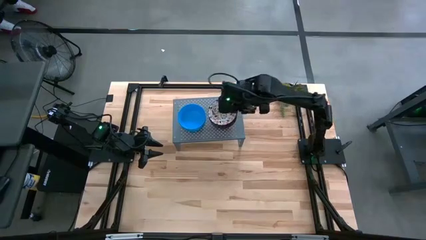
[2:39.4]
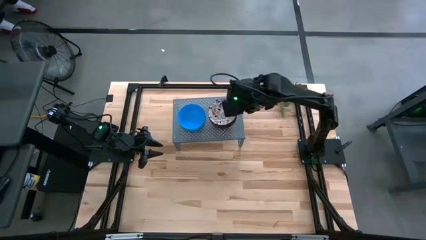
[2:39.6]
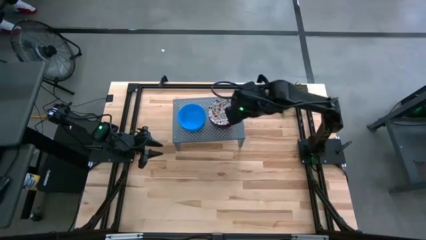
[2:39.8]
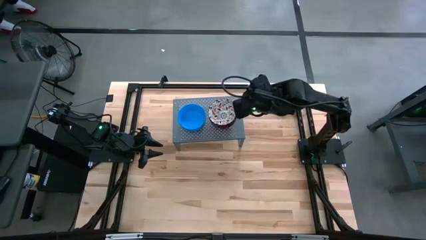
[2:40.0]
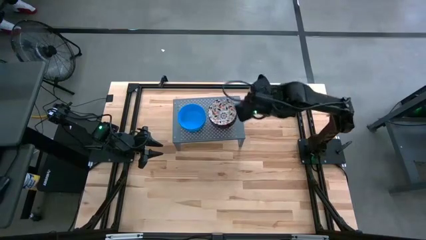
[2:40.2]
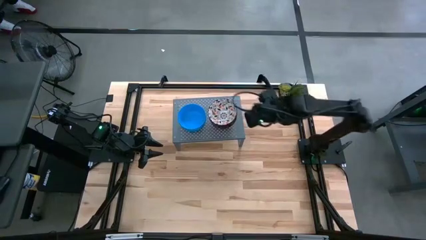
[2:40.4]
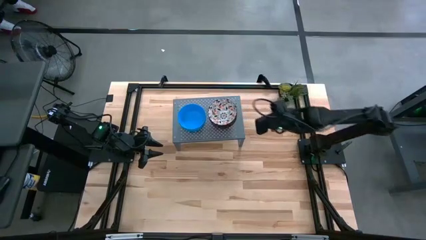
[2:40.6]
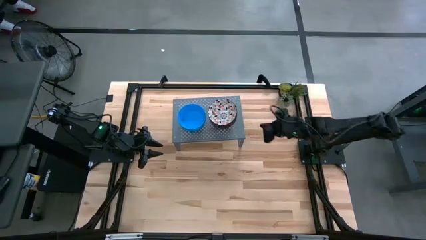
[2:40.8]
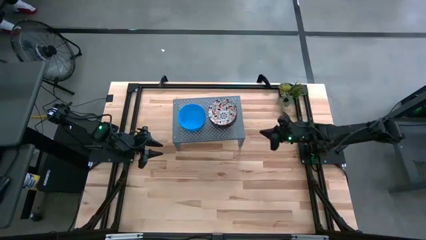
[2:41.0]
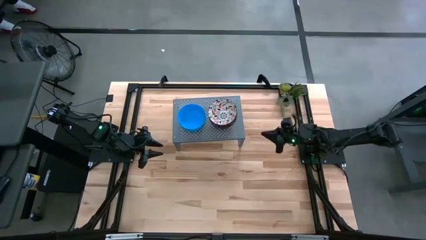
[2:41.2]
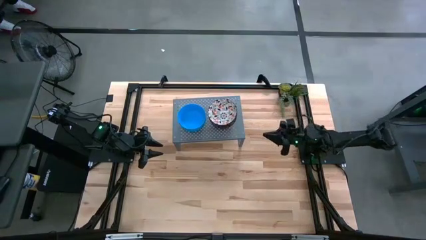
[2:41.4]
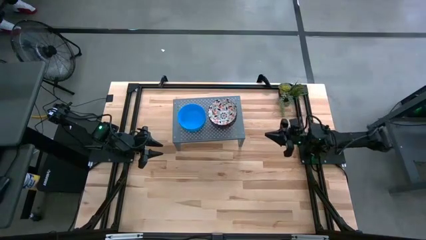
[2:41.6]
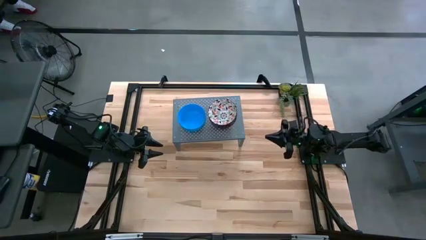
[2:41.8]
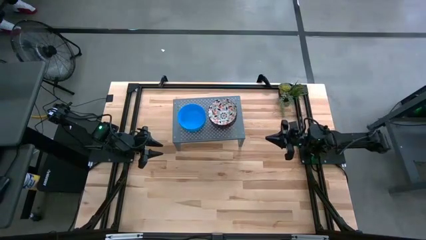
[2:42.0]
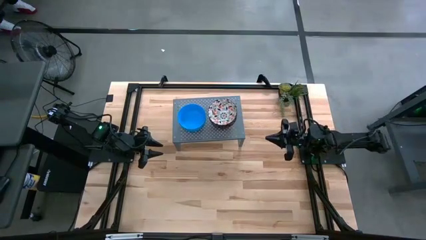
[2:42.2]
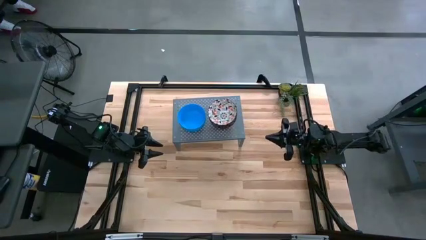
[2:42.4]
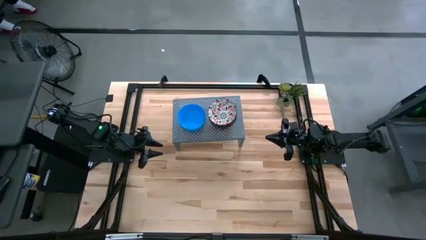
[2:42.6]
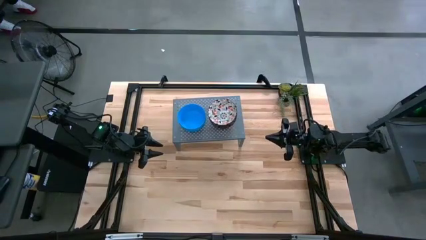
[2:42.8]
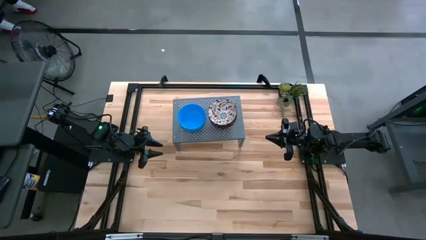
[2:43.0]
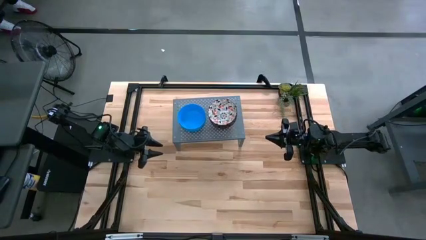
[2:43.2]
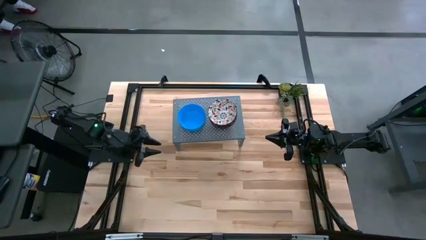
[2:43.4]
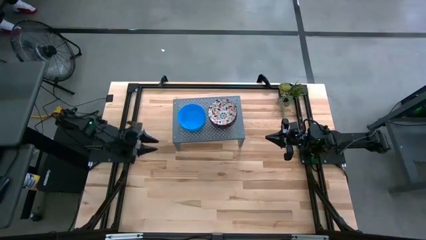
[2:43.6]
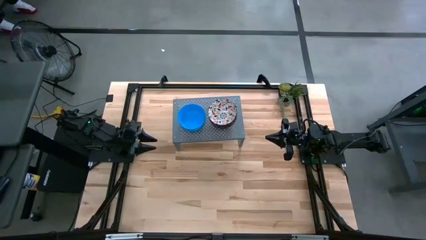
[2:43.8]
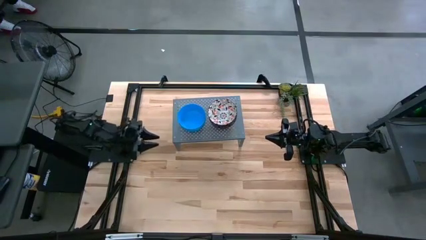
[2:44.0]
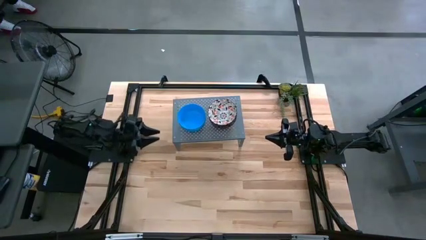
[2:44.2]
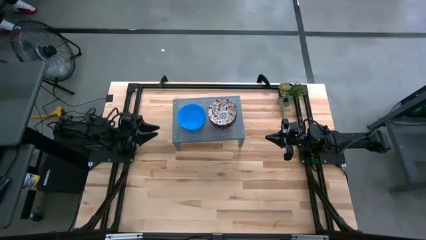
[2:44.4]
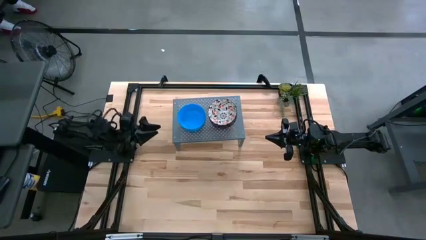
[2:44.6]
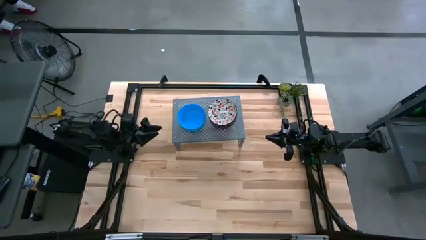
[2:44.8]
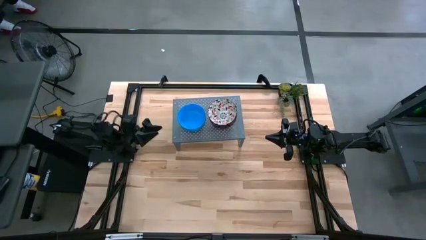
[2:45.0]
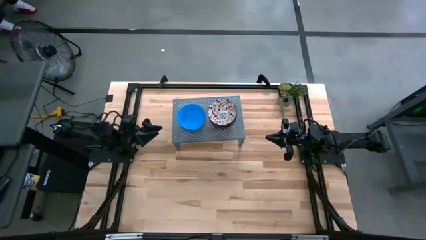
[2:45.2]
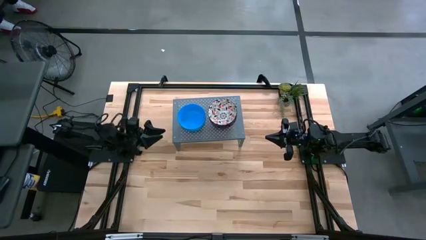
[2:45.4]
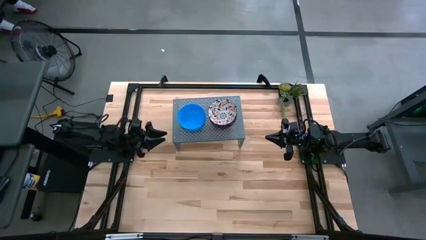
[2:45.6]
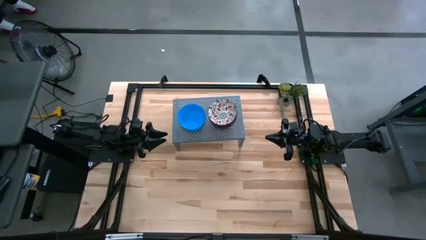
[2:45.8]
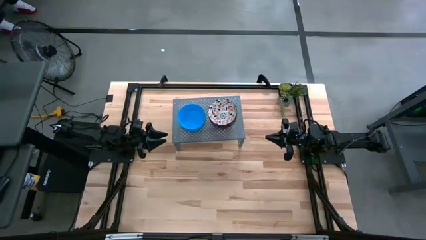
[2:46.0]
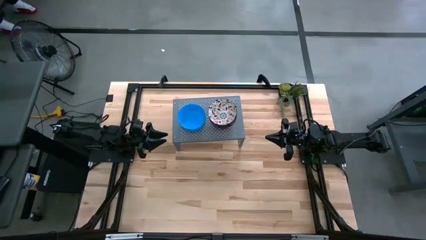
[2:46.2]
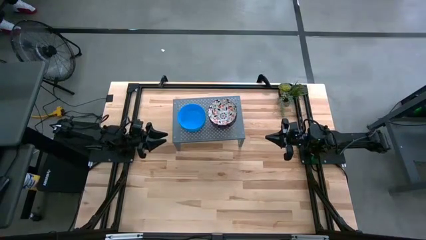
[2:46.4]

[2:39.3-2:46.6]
Task: Pick & Place Mini bowls
Return to Home Position

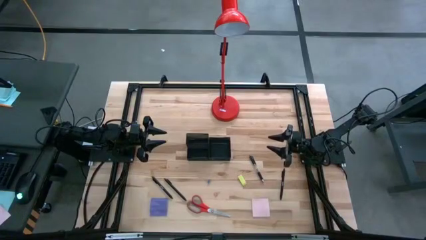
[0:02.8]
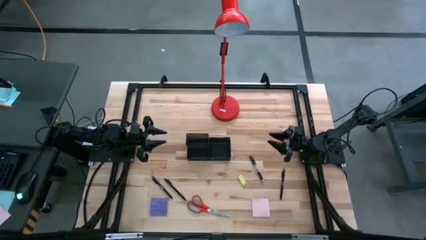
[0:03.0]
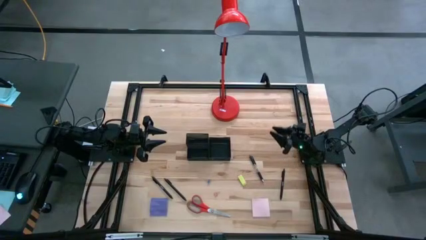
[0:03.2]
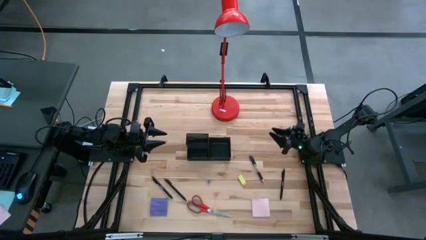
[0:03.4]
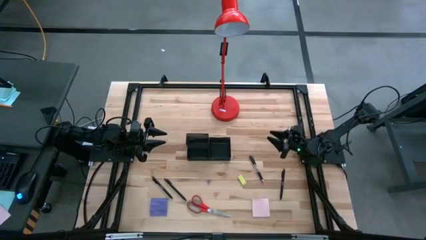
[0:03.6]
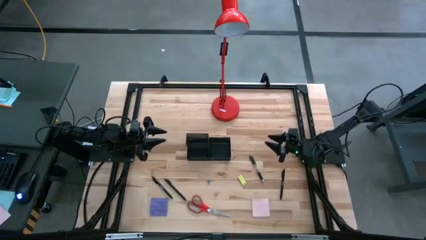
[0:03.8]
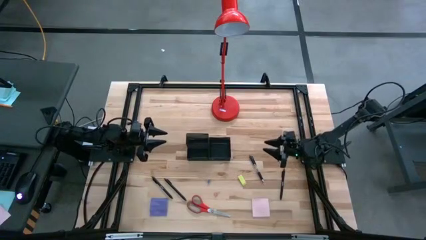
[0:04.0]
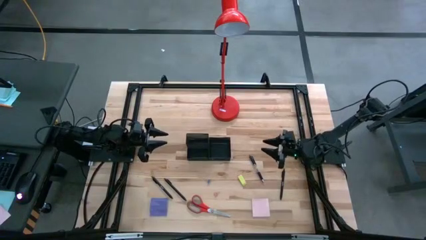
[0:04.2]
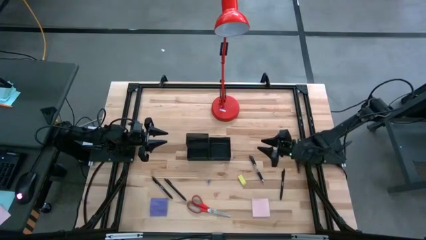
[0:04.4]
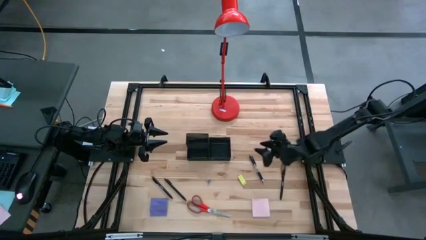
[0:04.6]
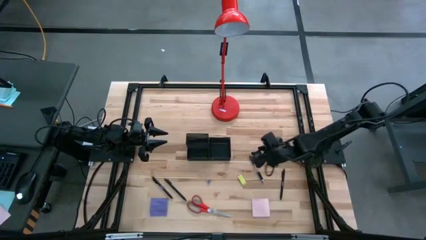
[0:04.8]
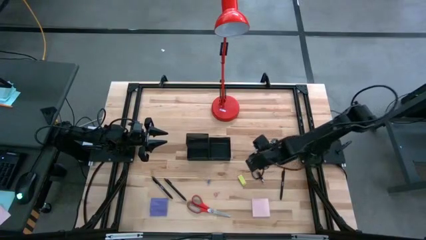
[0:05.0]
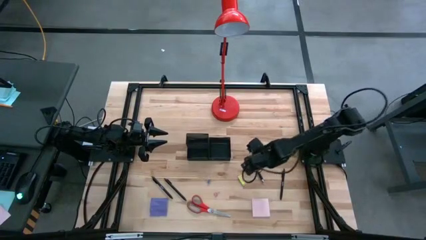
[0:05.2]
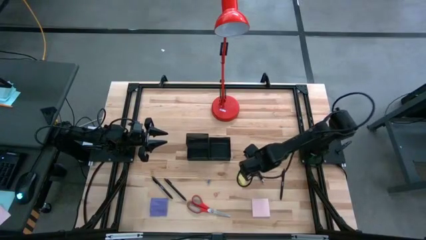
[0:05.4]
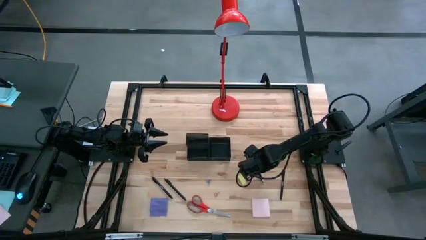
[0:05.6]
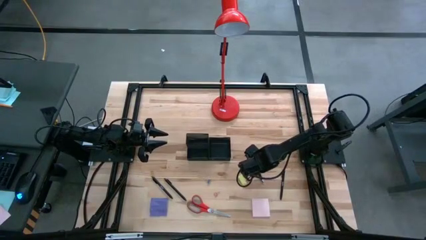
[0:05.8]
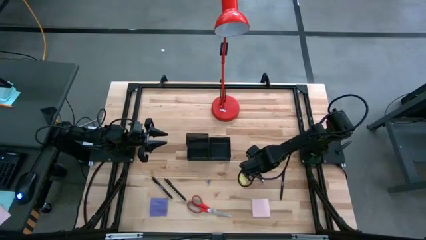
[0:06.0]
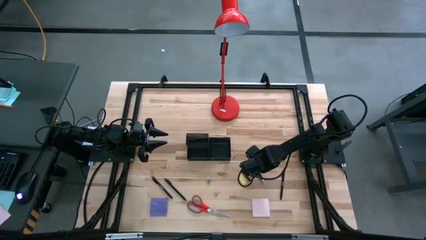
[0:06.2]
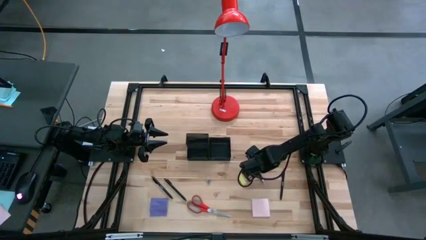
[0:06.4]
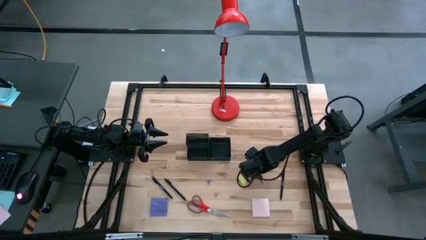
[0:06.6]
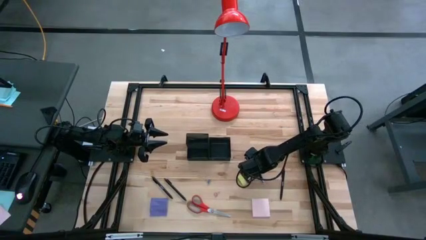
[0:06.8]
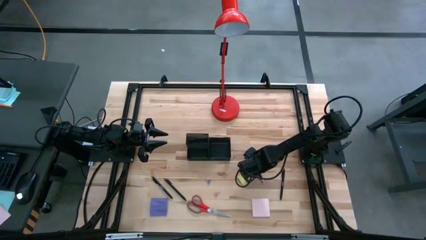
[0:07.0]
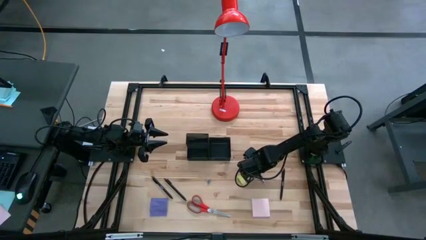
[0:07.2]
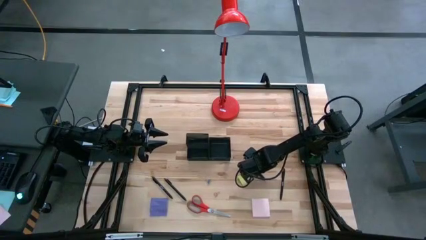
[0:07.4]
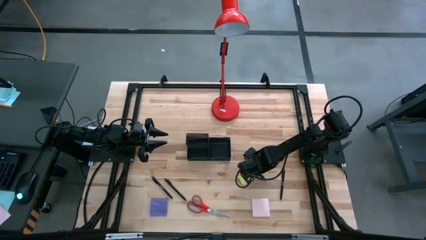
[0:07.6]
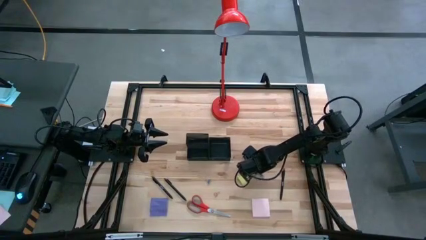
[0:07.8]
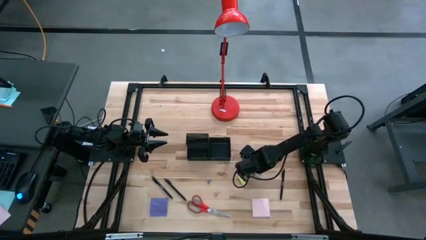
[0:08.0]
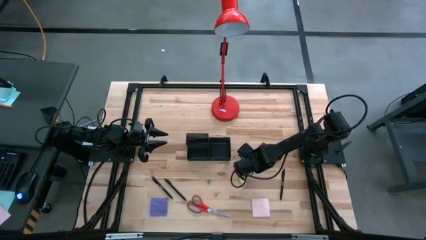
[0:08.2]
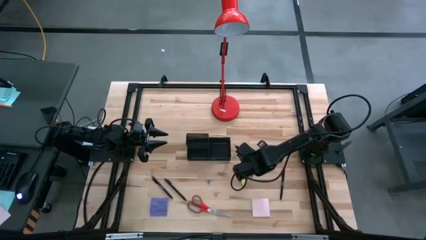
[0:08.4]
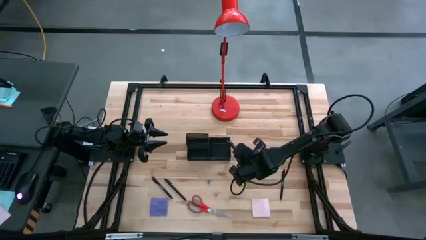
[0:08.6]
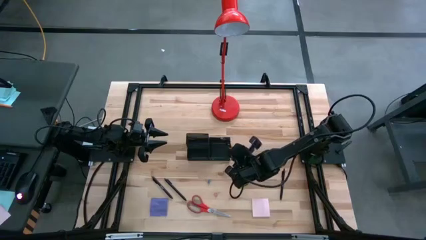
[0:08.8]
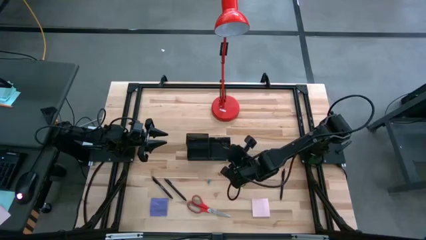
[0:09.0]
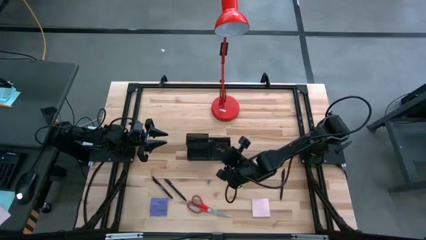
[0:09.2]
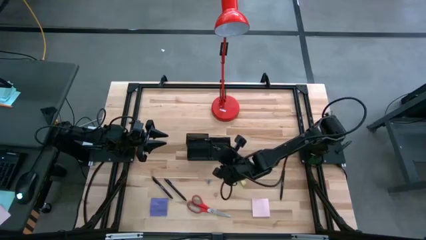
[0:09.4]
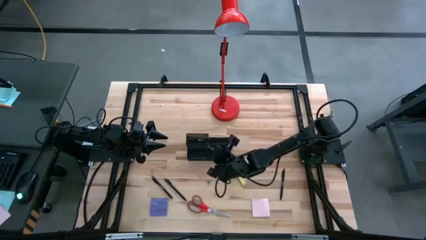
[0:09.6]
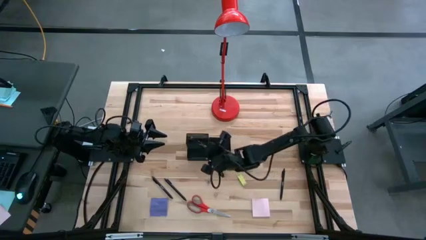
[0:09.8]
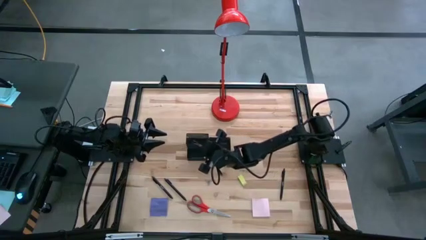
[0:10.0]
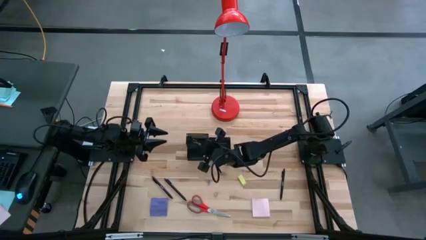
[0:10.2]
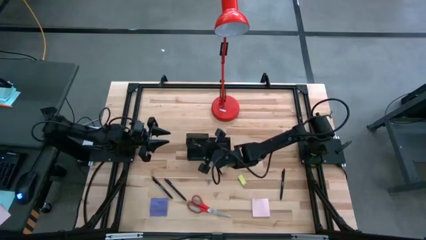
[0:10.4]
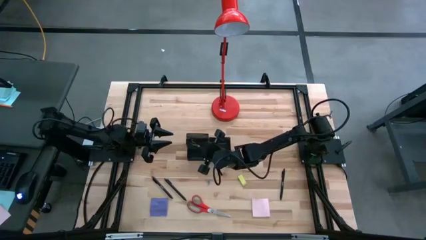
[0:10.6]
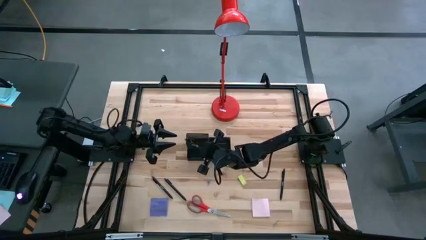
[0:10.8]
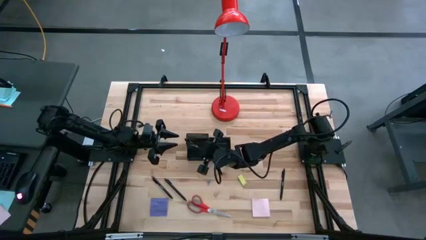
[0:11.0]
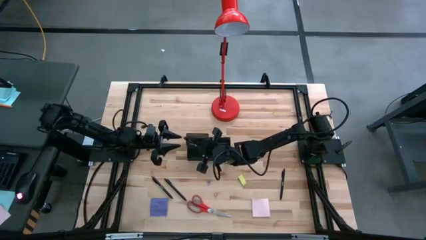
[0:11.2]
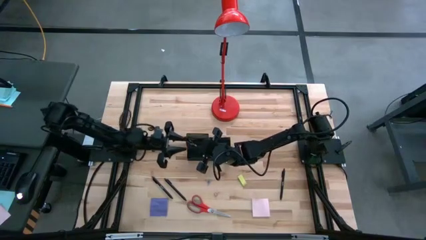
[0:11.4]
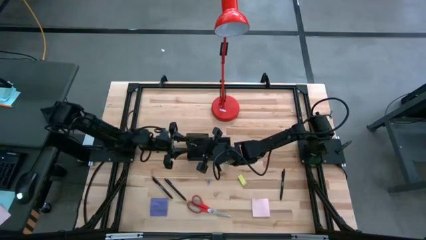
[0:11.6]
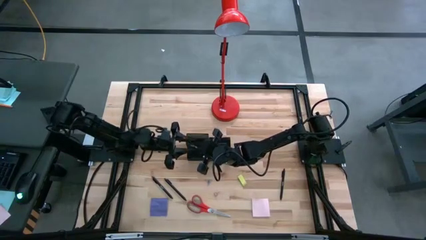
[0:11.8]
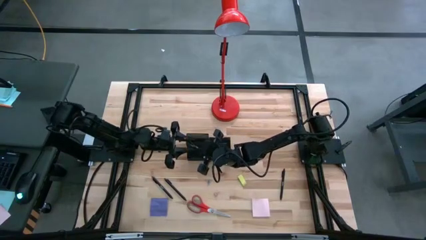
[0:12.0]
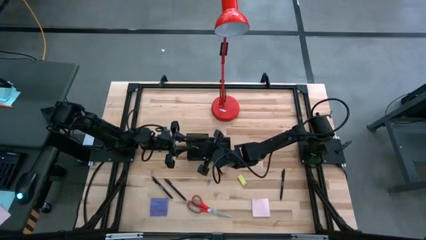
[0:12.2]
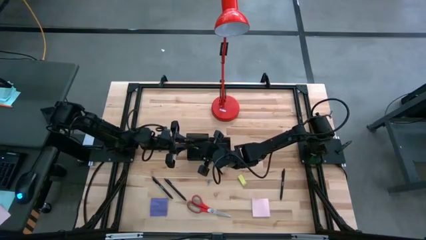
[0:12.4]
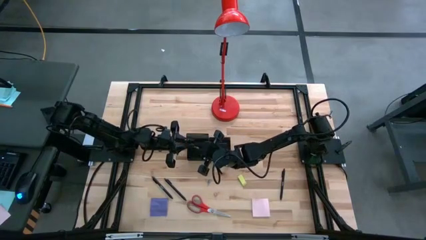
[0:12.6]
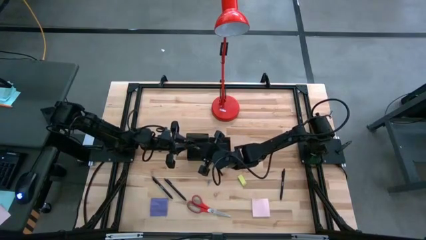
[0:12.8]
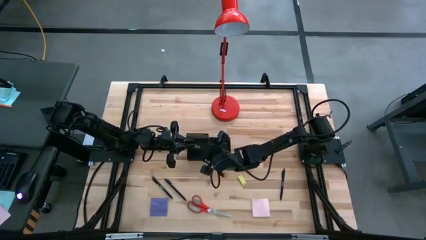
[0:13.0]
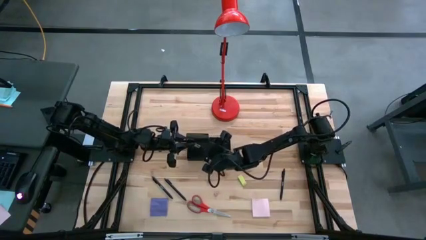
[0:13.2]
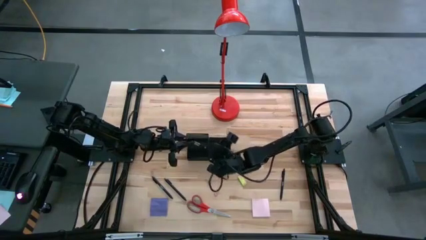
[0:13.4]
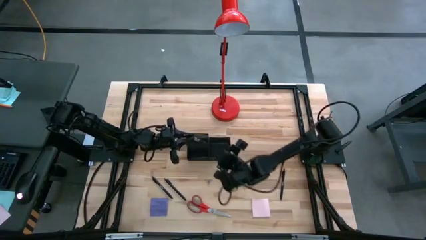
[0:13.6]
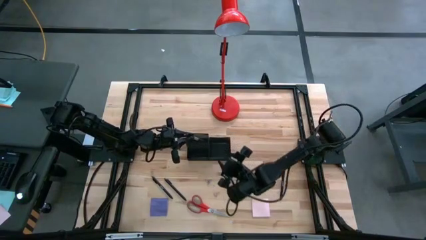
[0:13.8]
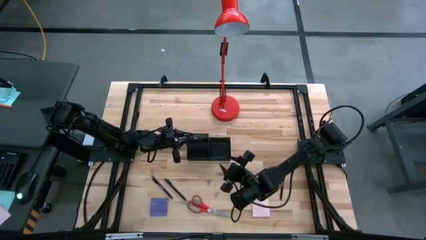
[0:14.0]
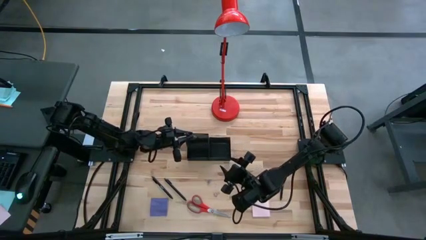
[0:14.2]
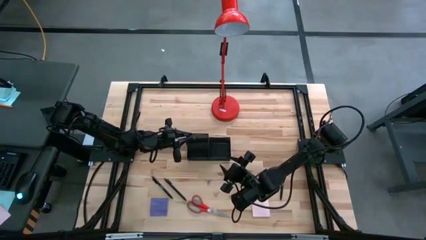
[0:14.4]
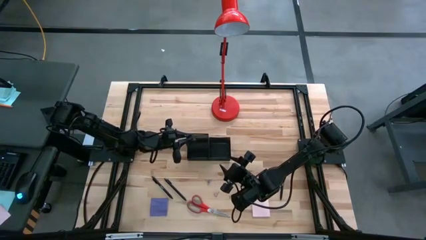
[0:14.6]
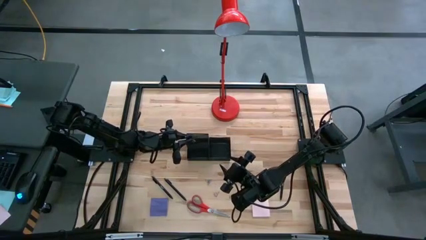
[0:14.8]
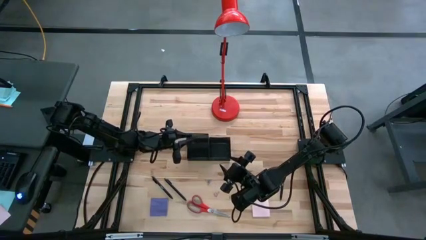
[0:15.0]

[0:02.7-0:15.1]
Task: Pick and place office supplies into organizer
Put the black pen into the desk organizer
